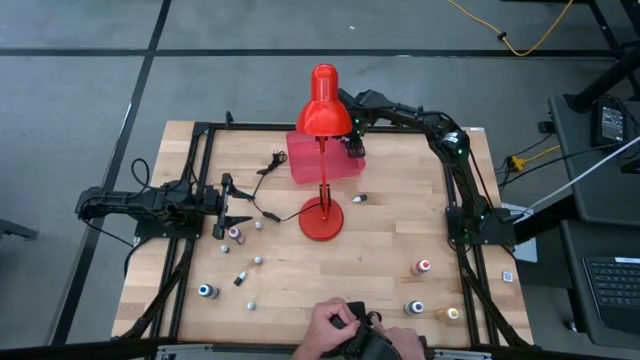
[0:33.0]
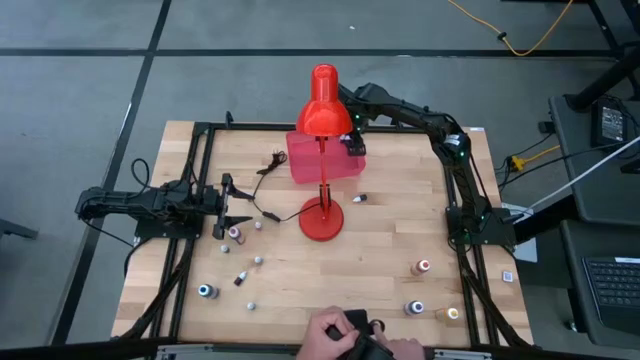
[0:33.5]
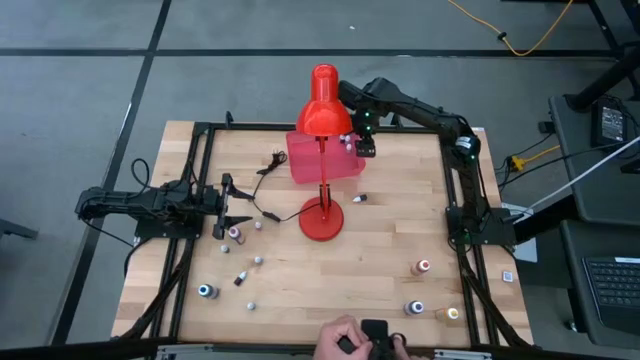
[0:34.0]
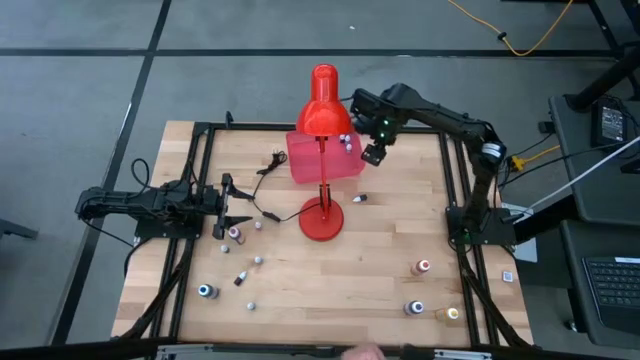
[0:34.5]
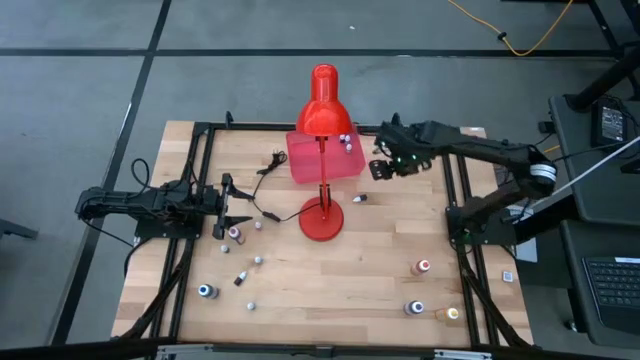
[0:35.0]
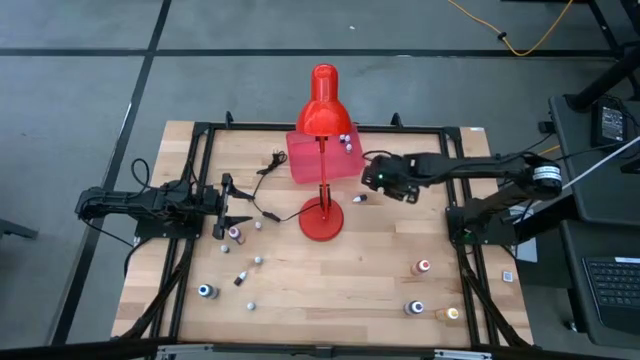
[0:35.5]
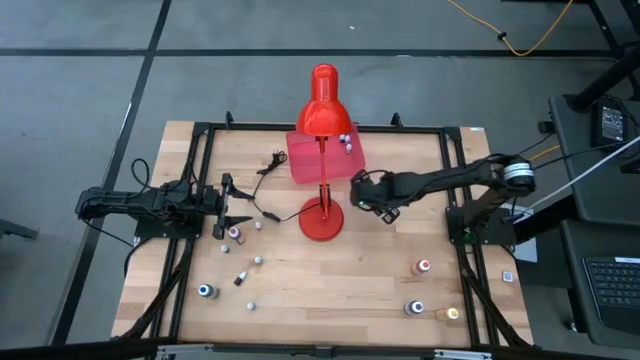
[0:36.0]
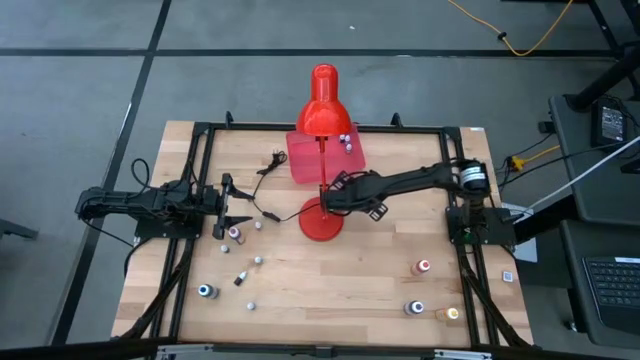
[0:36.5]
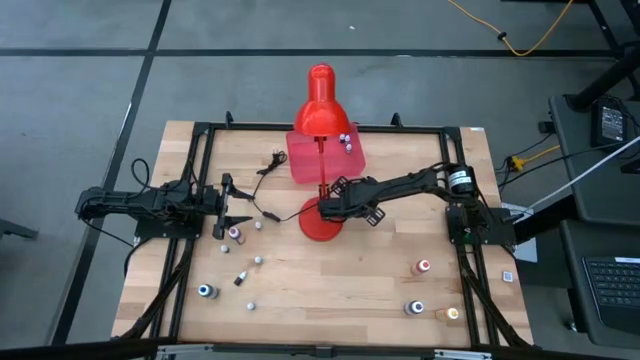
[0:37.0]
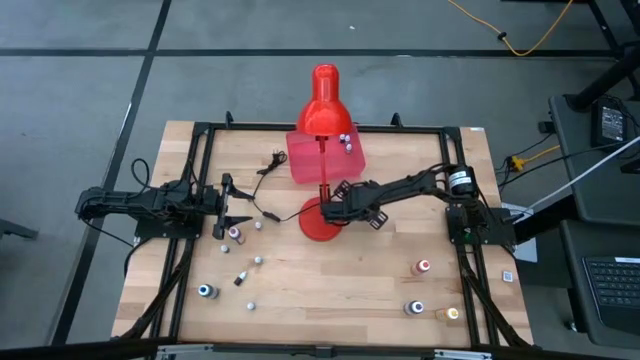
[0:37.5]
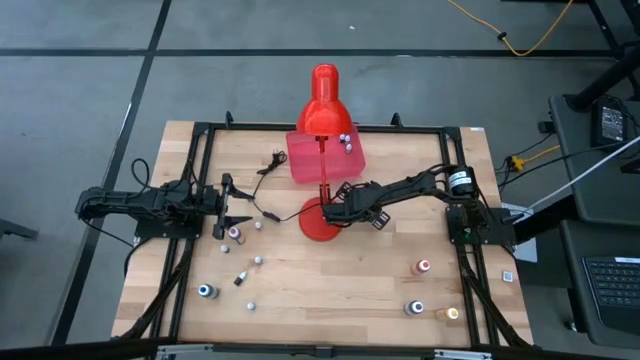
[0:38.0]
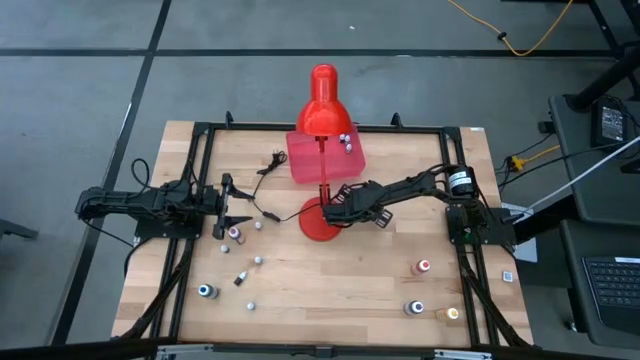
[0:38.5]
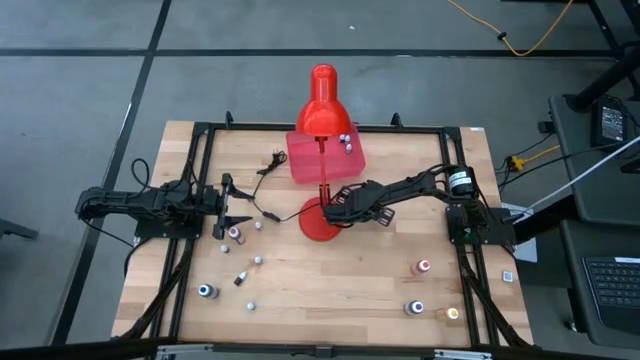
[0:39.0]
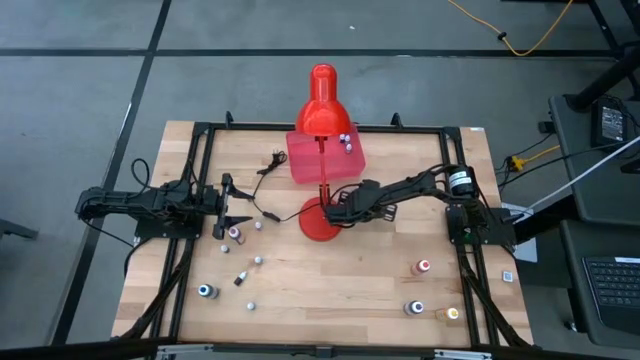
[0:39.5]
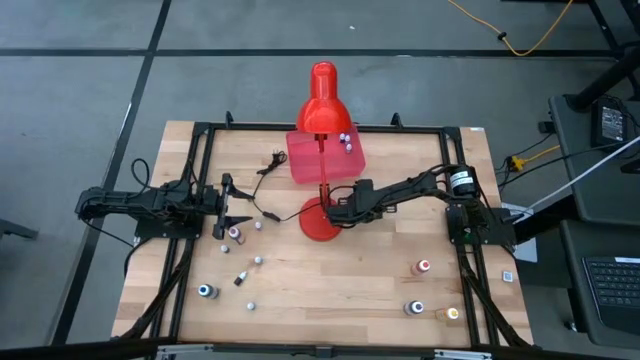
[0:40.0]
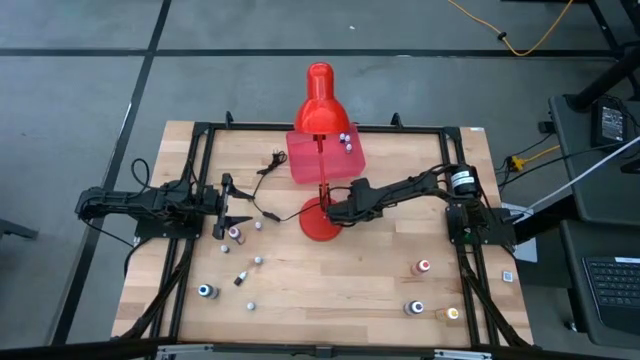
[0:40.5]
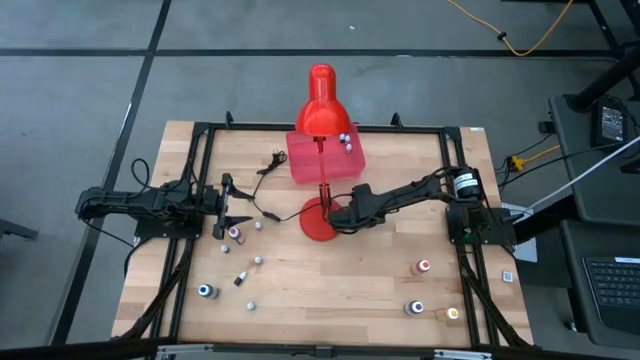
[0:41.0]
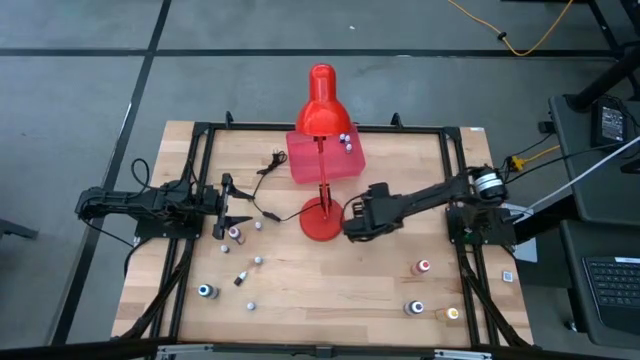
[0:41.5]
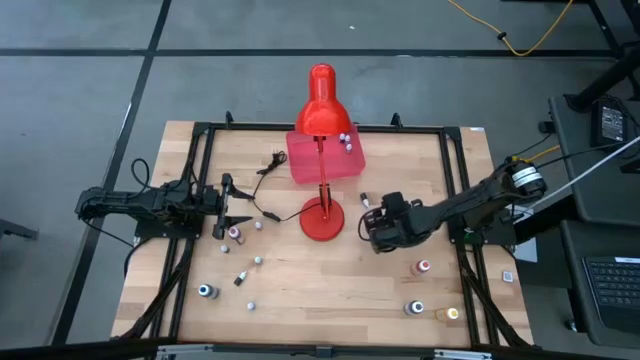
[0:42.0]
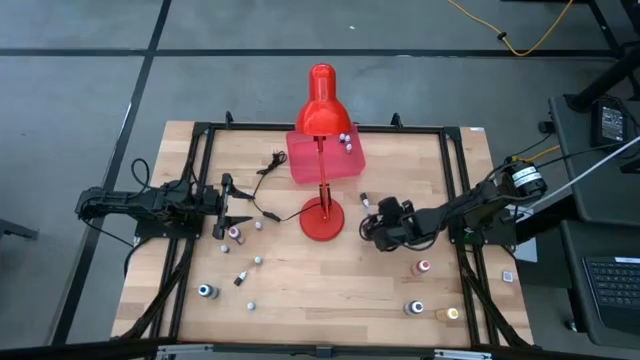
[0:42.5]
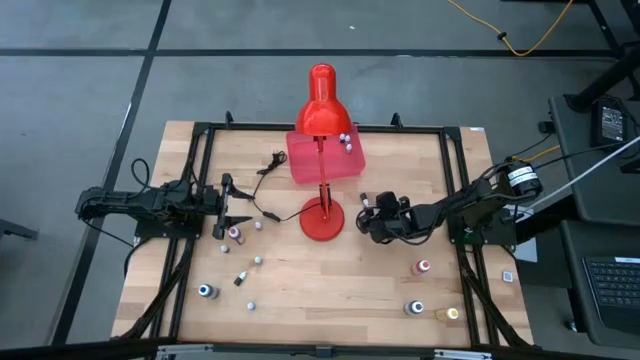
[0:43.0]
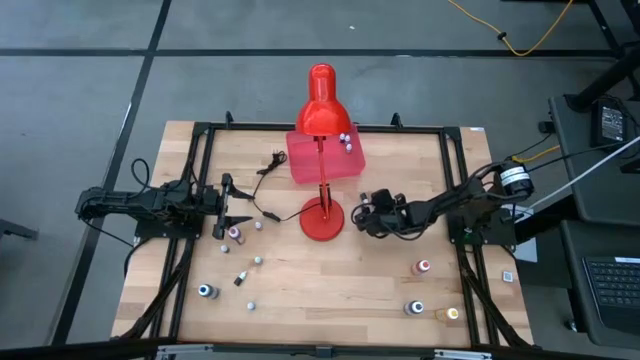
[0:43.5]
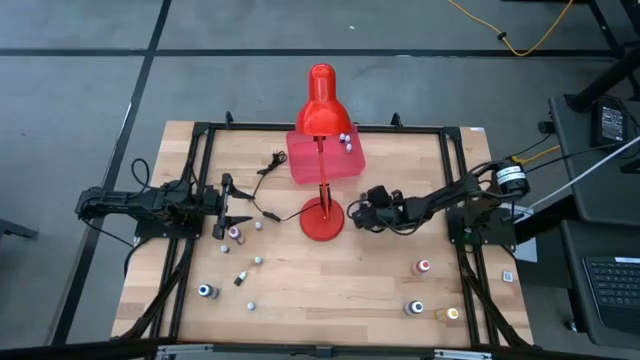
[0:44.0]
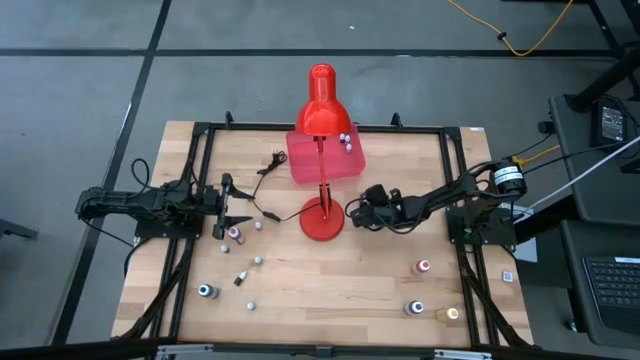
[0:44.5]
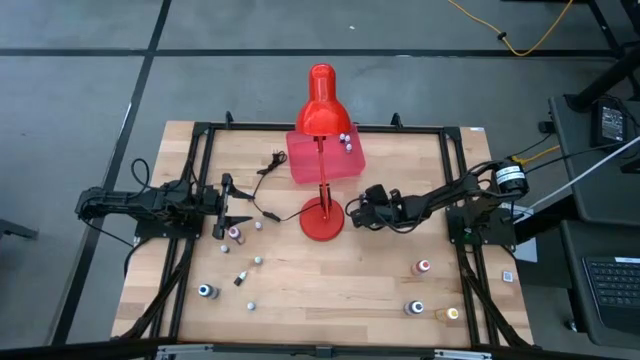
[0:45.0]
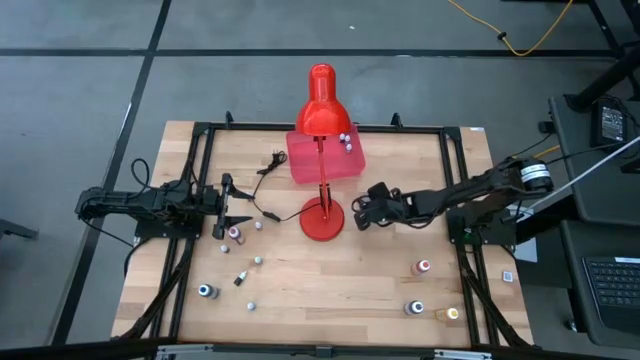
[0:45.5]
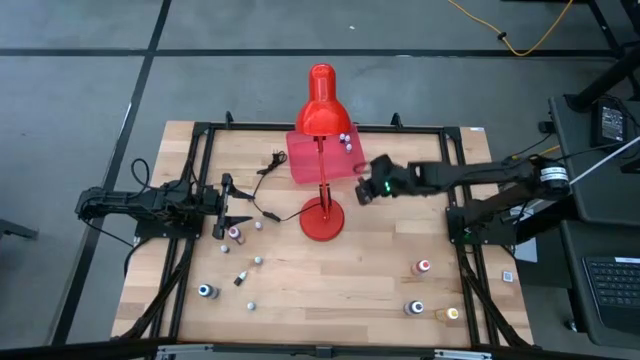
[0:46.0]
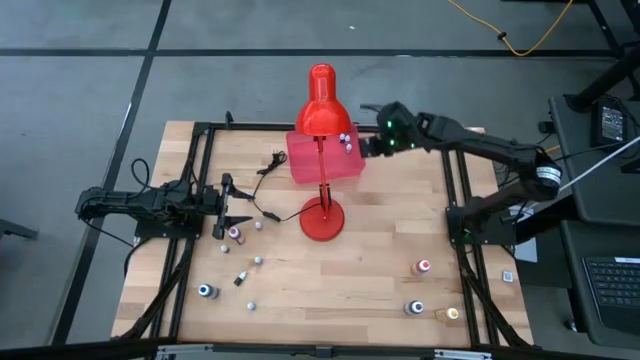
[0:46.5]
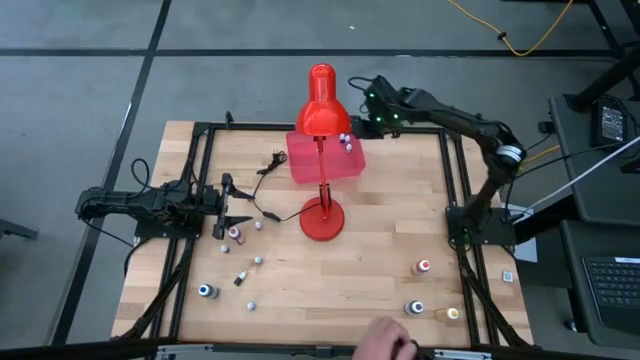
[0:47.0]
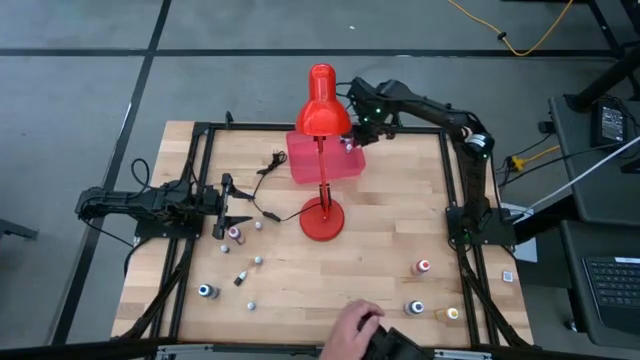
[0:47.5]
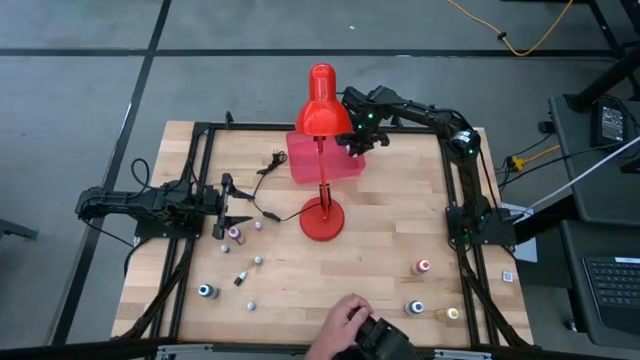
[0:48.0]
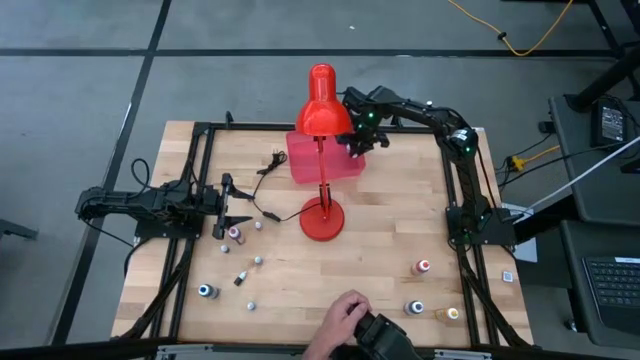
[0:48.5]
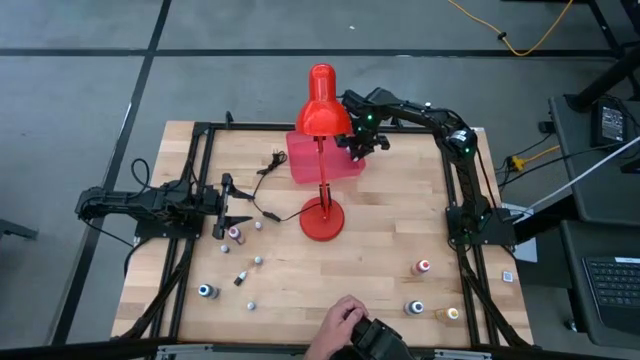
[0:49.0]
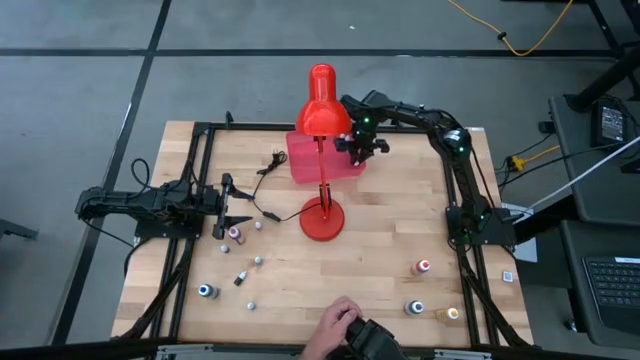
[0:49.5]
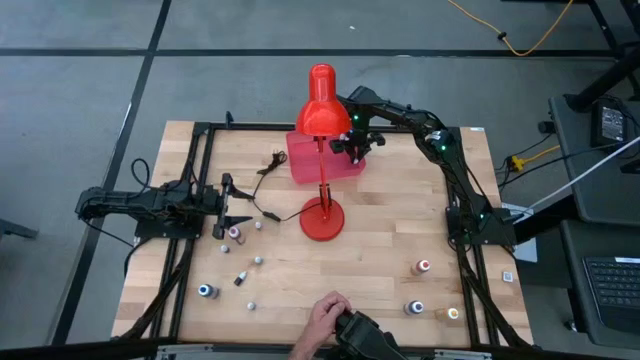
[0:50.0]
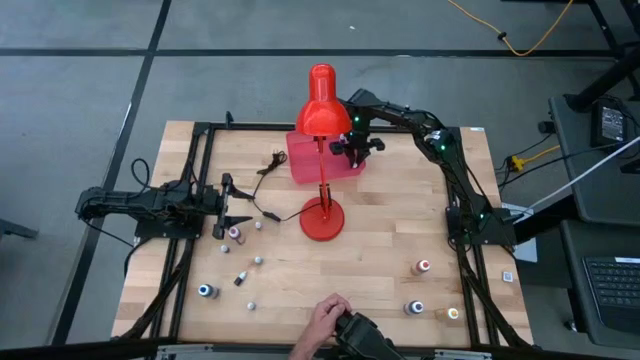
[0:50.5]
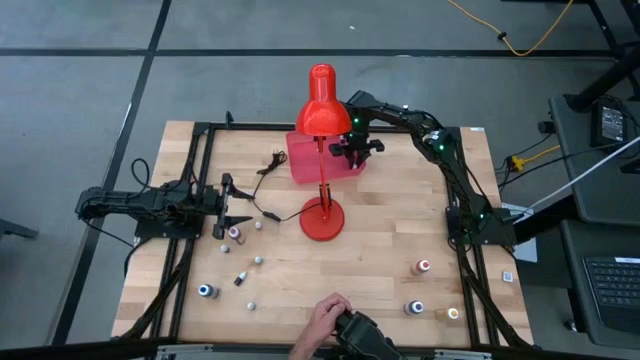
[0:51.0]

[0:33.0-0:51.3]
Task: Pick & Place food coloring
Put the small brown food coloring bottle into the red bin

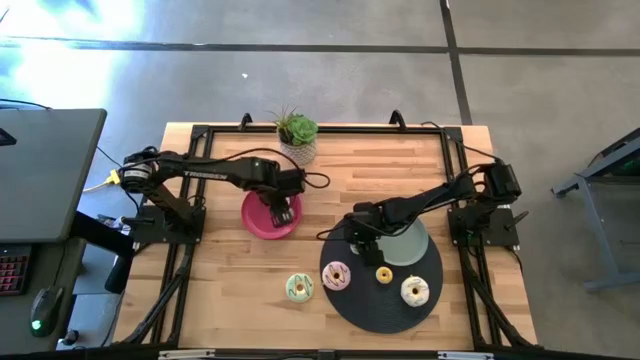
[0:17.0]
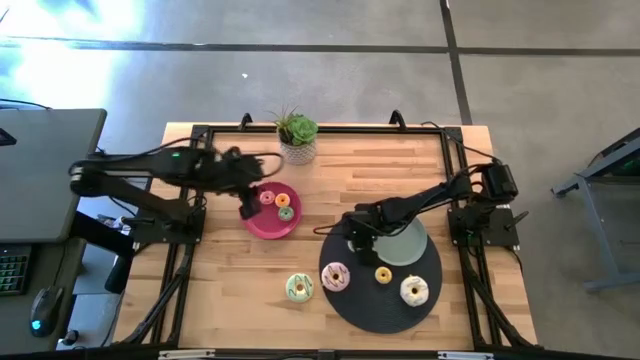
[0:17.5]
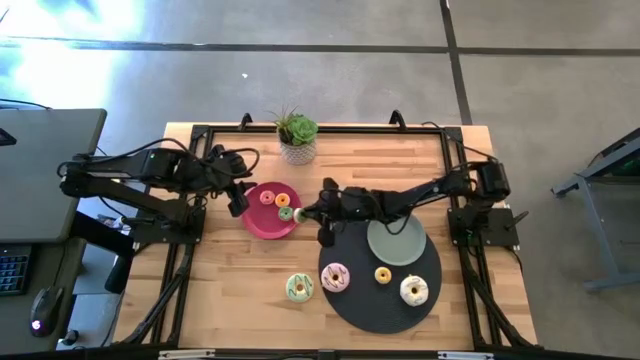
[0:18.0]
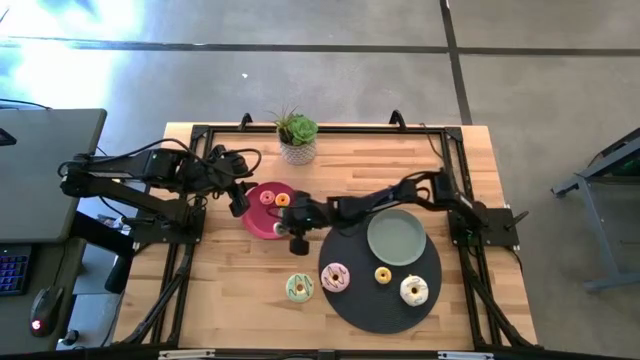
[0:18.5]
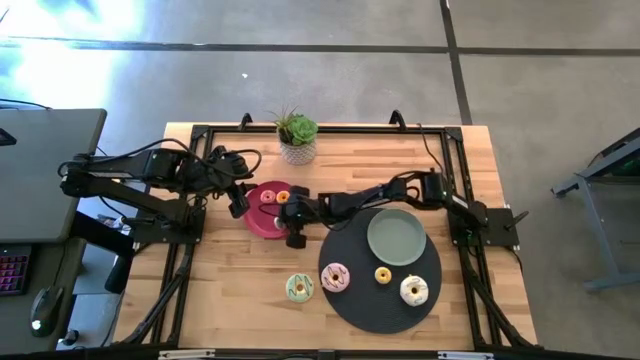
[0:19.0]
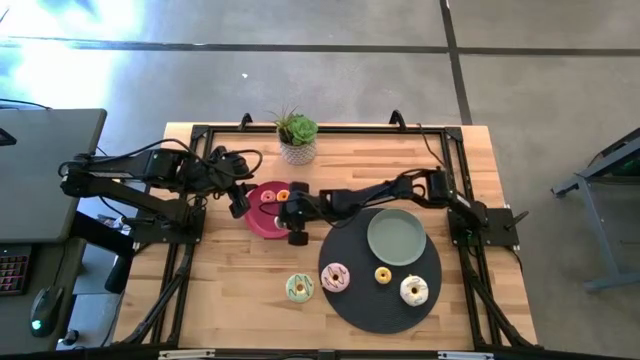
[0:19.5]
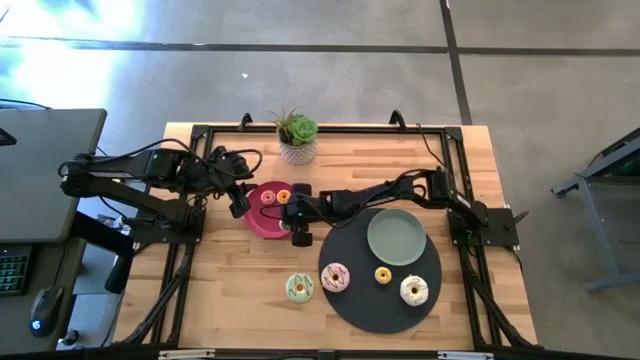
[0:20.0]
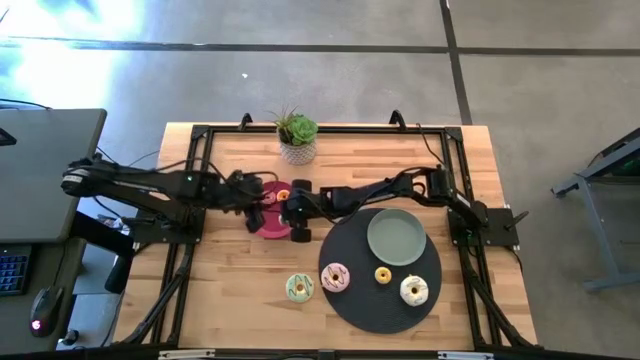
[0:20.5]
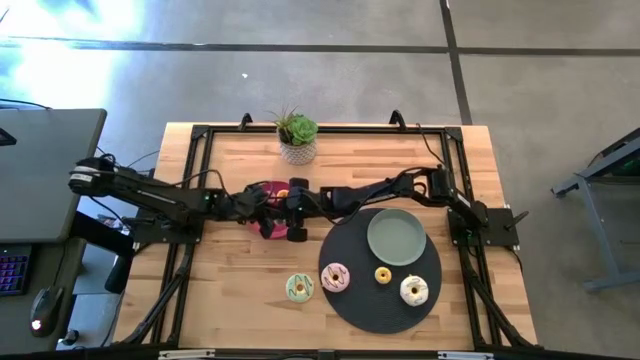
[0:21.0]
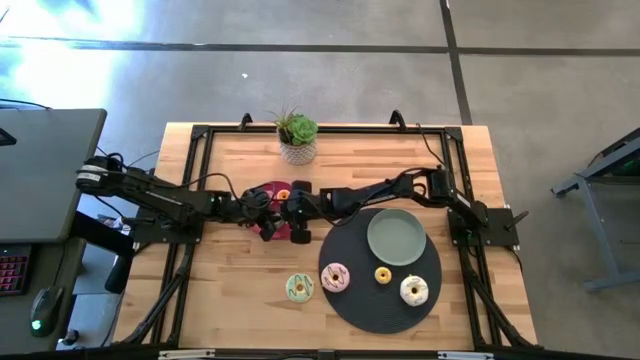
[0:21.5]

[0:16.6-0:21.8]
Task: Pick & Place donuts
Put the small green donut on the pink plate
